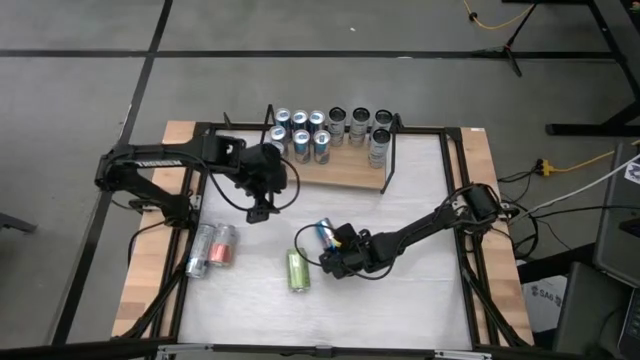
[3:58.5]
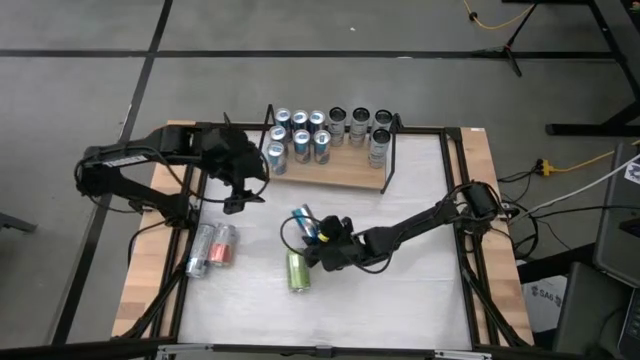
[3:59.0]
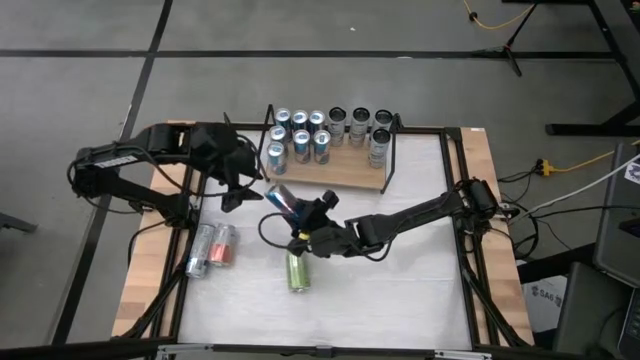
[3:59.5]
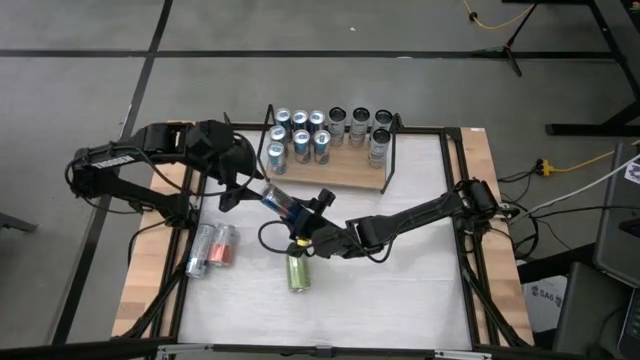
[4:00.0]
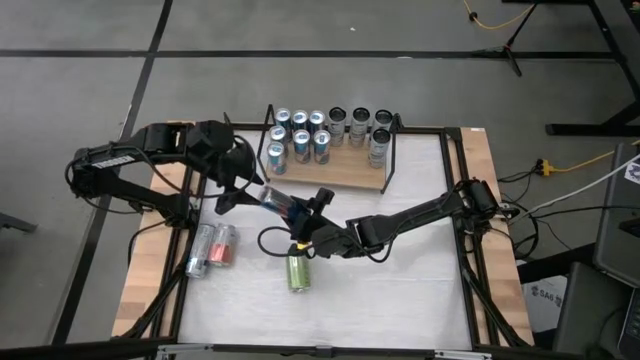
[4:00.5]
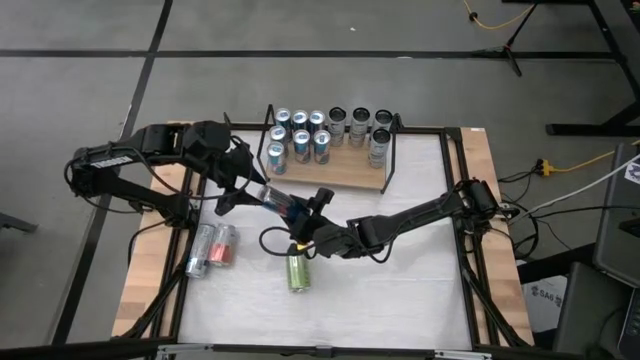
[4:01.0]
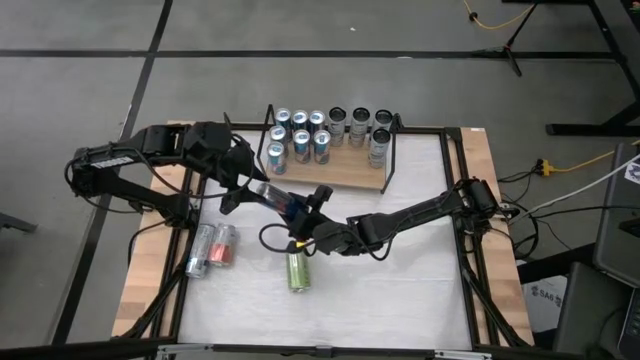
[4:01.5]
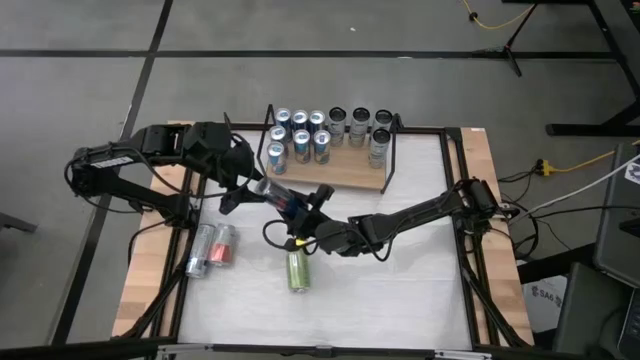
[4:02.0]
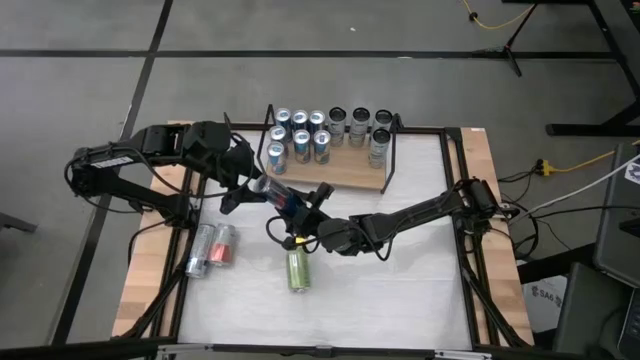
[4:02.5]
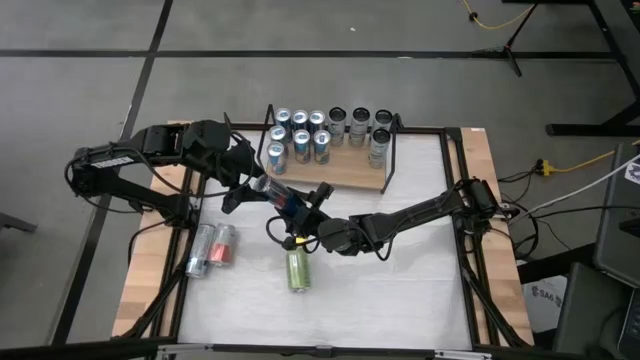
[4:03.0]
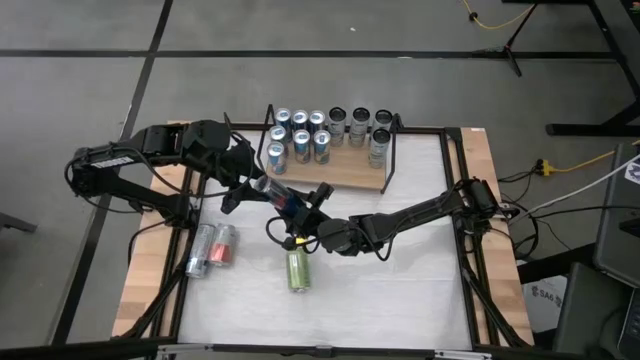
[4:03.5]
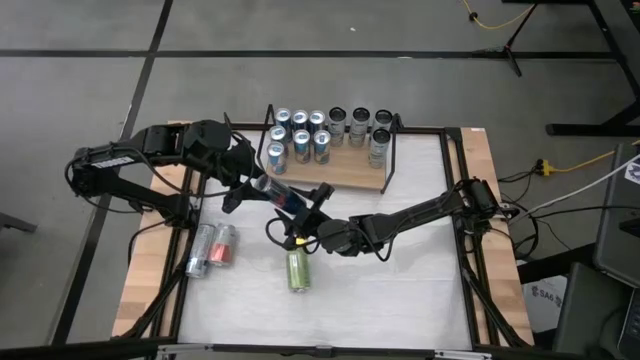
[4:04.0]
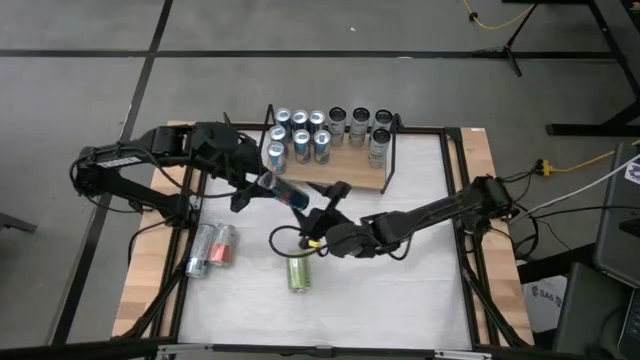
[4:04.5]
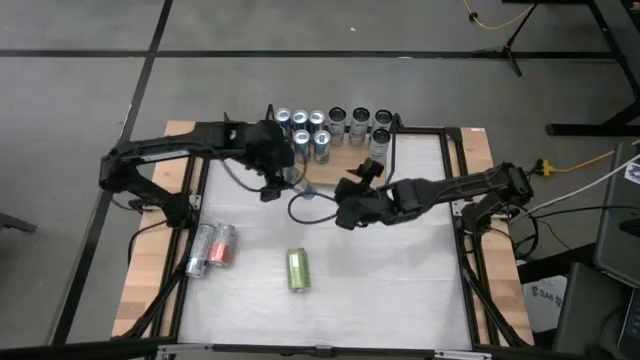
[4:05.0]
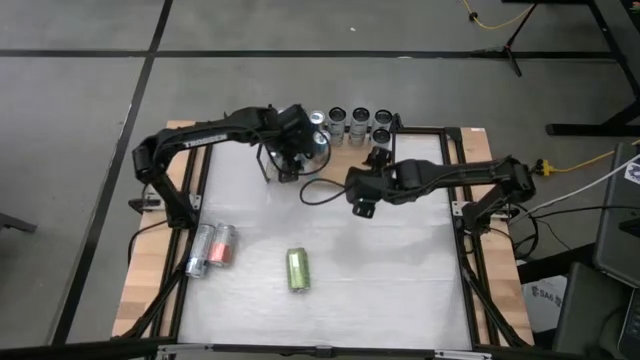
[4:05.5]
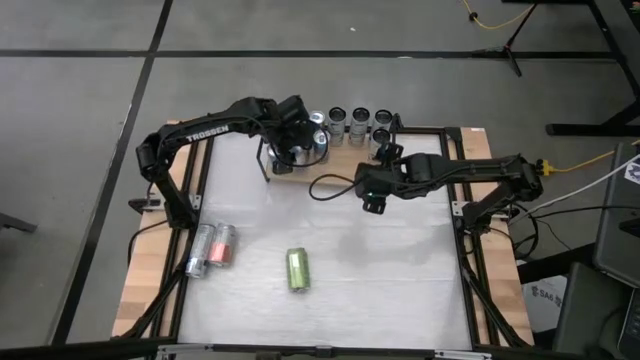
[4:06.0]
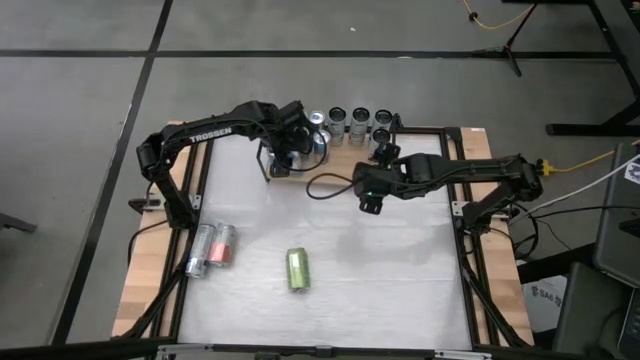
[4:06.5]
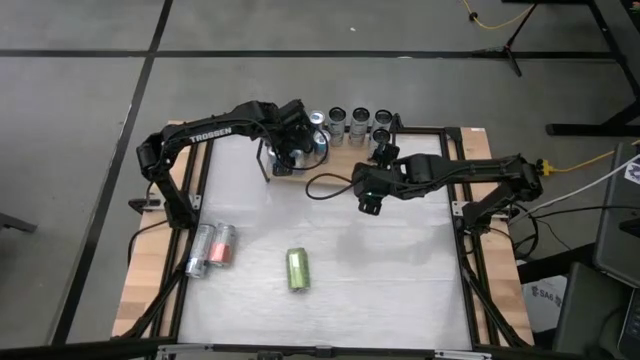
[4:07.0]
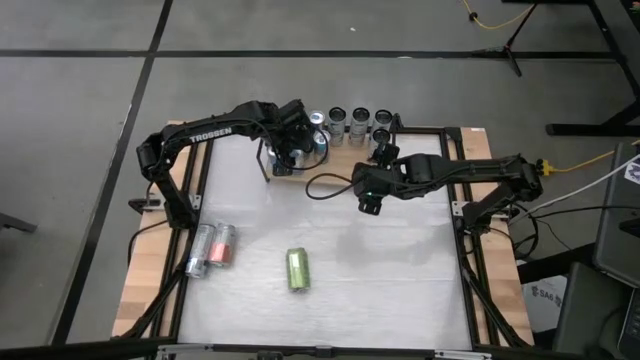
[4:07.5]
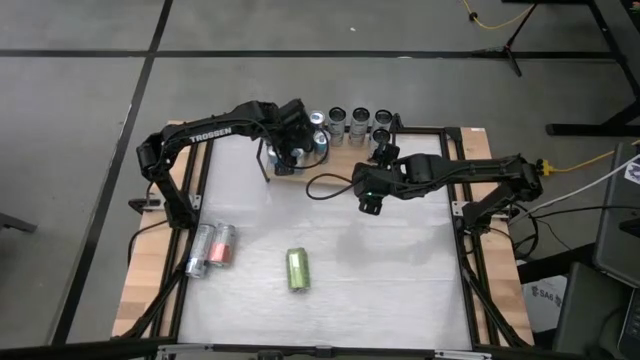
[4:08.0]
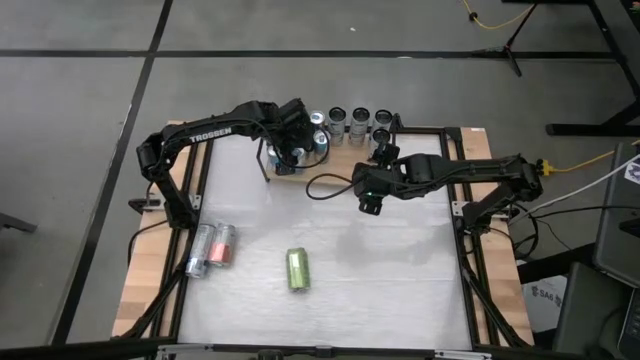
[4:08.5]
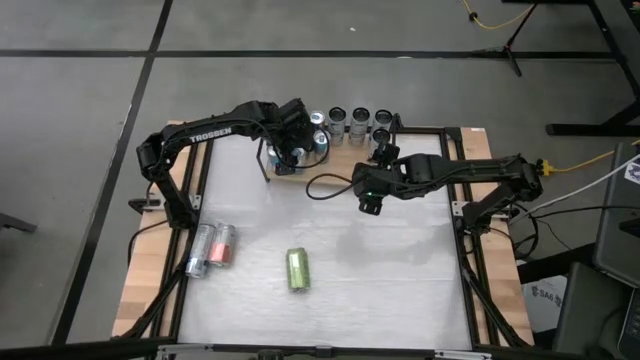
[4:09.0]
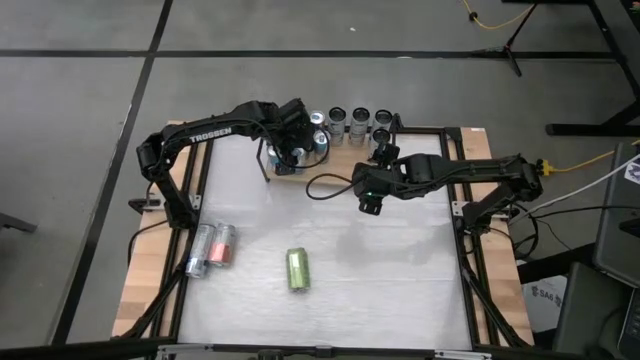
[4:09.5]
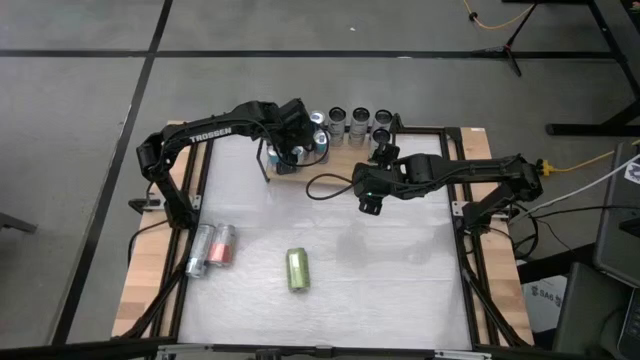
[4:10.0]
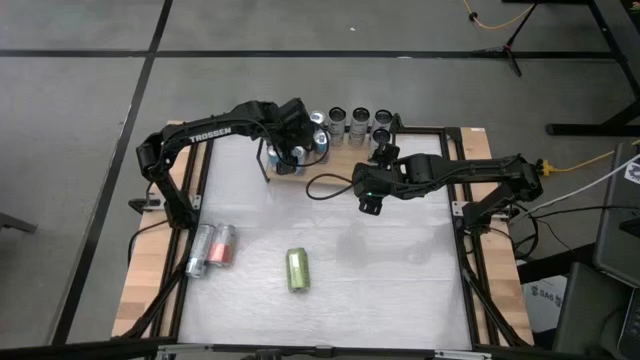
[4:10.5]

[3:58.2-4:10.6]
Task: Place canned beverage on shelf
Put the blue soda can on the shelf aligned with the other blue soda can

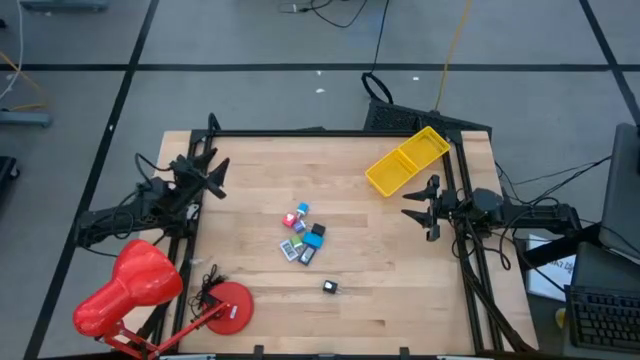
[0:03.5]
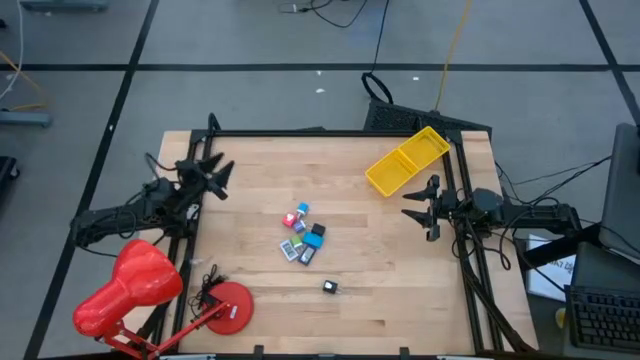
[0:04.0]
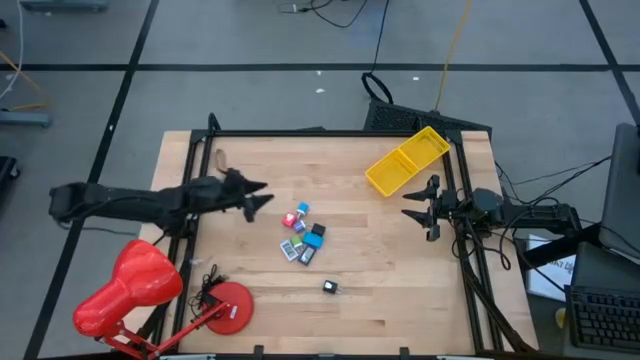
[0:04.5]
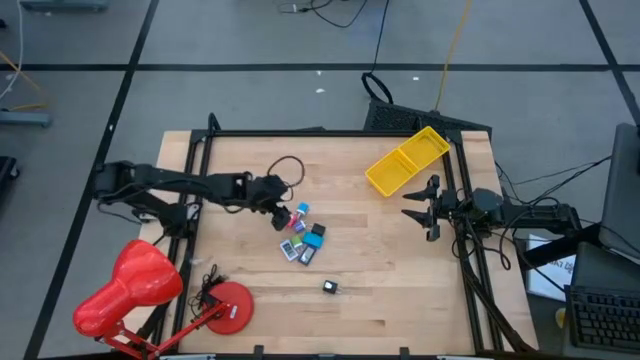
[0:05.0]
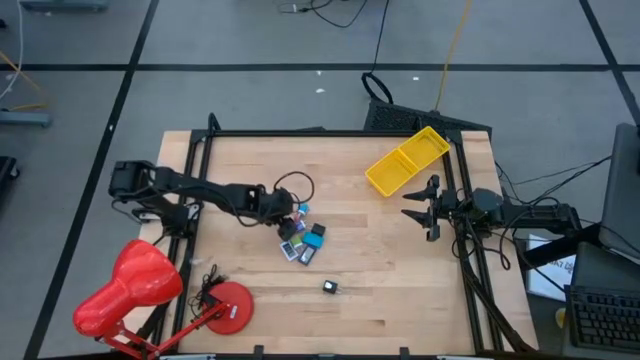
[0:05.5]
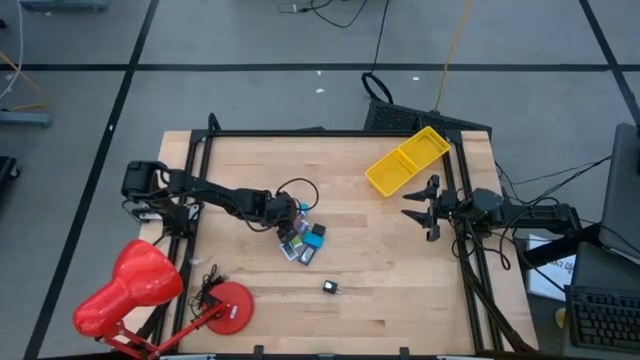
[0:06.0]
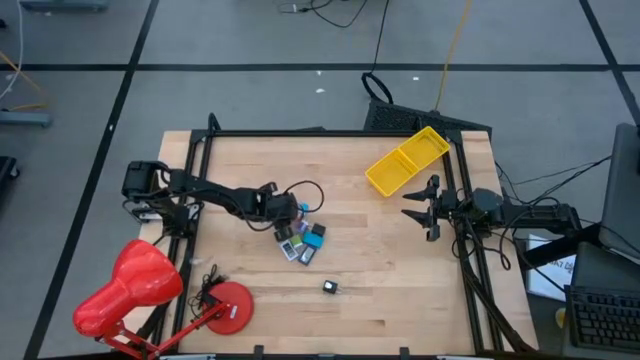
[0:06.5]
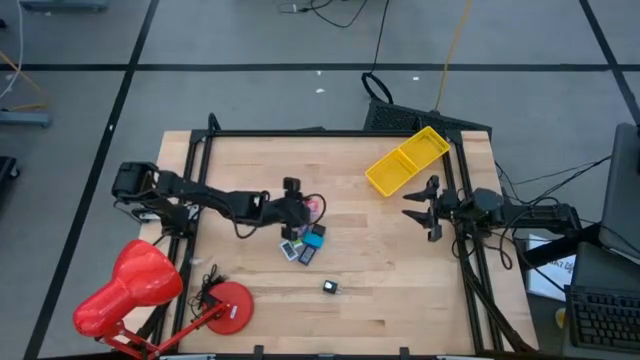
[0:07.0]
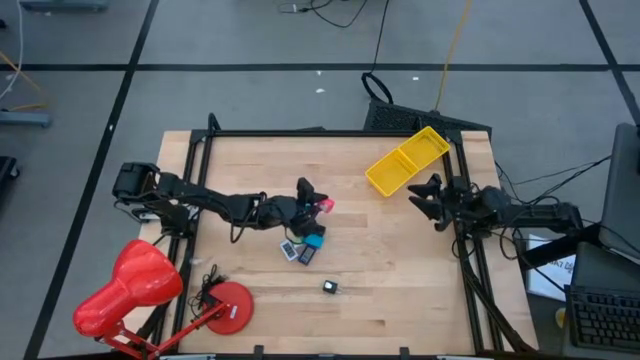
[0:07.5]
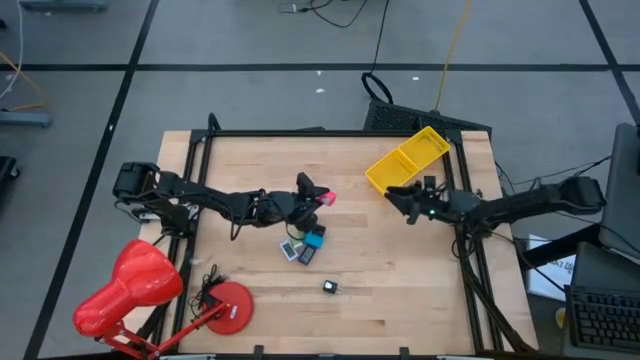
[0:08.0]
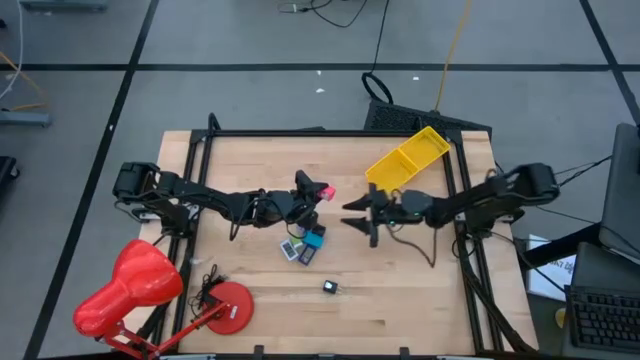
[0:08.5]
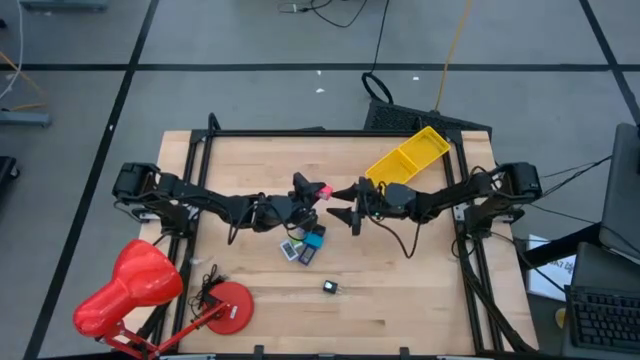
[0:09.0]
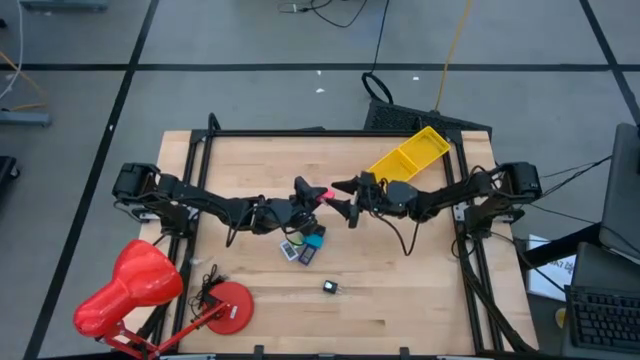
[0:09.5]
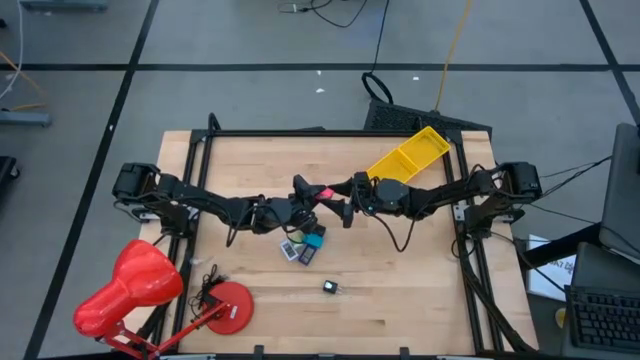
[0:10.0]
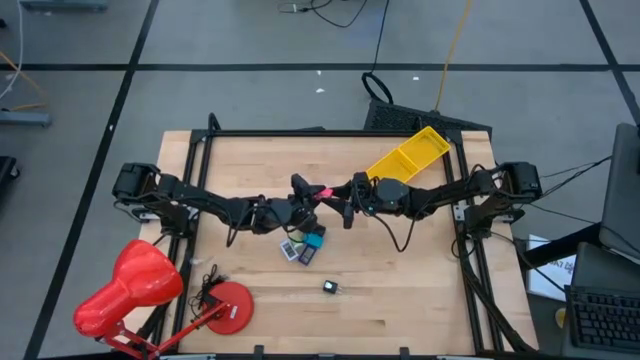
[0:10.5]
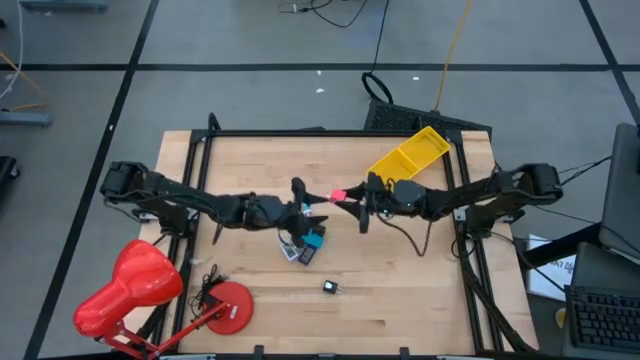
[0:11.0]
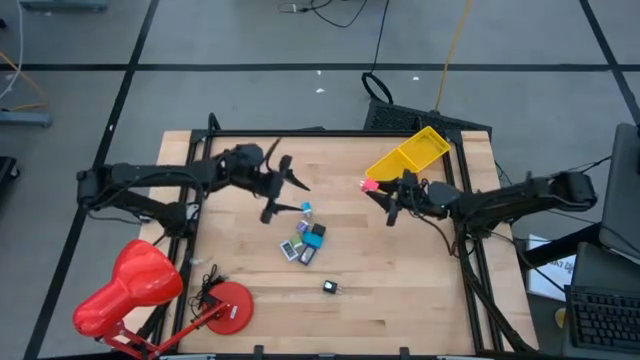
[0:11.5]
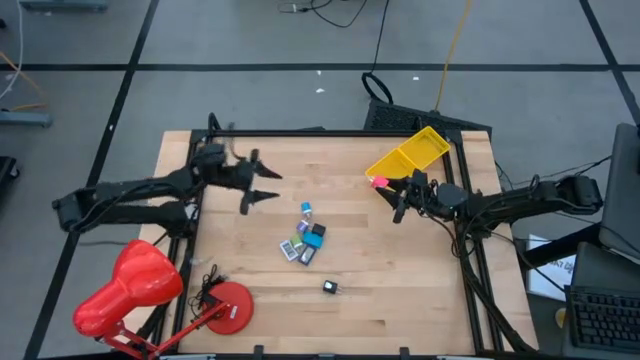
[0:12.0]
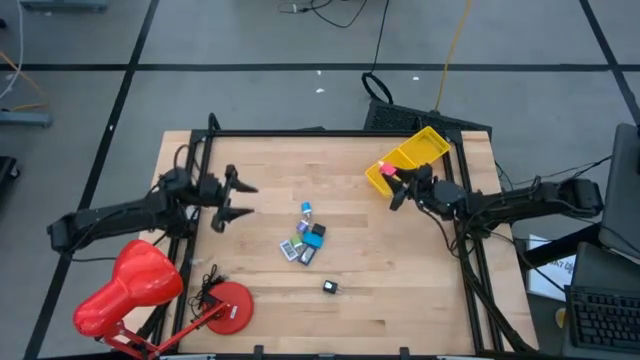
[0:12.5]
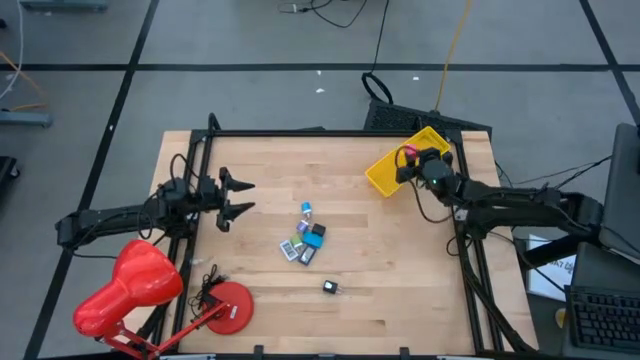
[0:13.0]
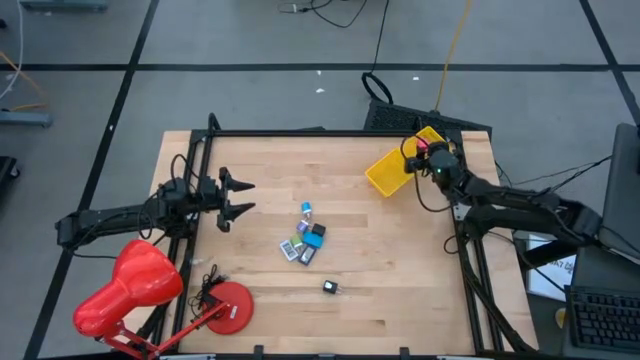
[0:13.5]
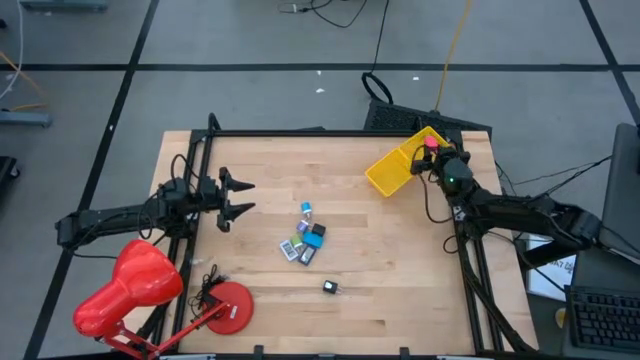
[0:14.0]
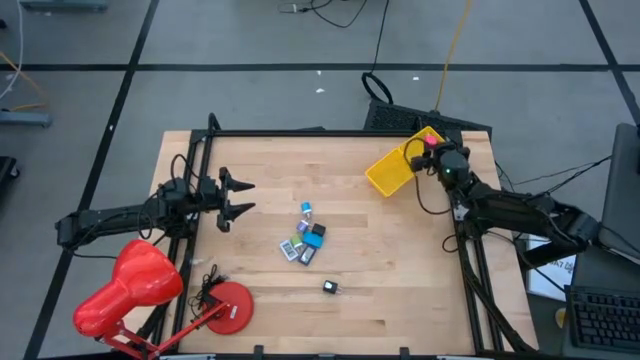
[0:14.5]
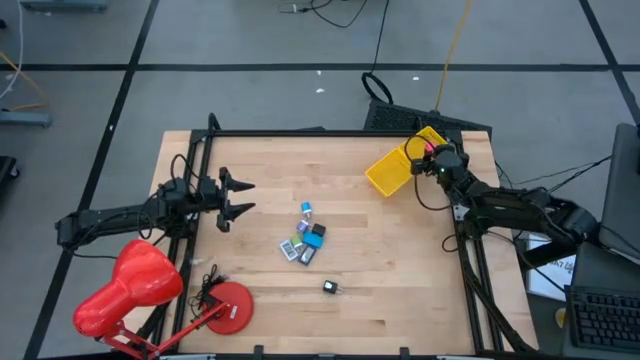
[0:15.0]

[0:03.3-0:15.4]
Task: Pick & Place Office items
Put the pink charger adapter into the top yellow basket
